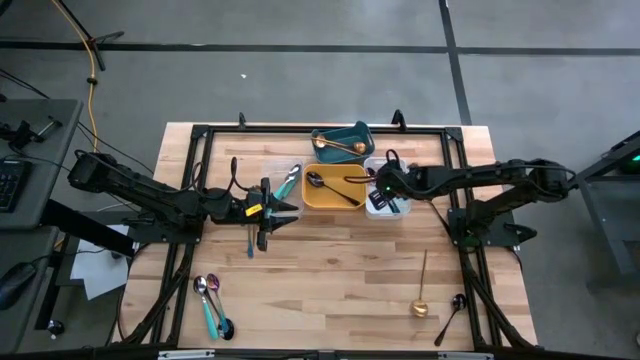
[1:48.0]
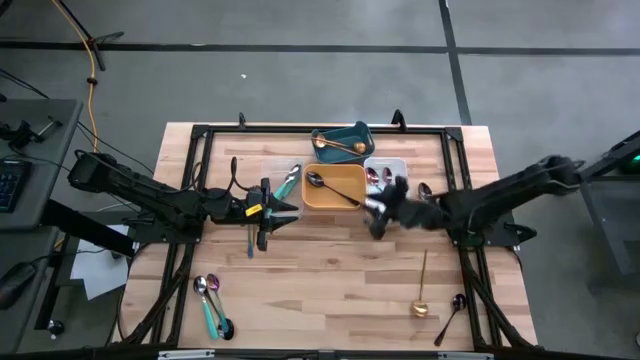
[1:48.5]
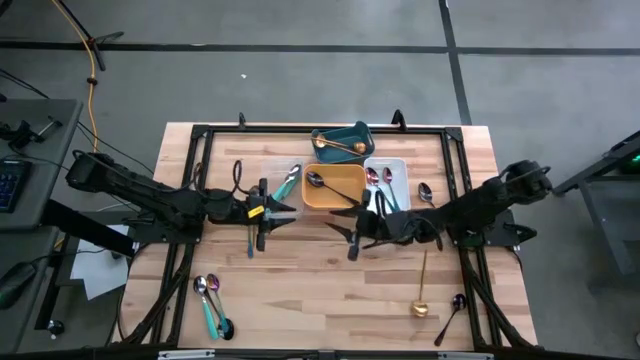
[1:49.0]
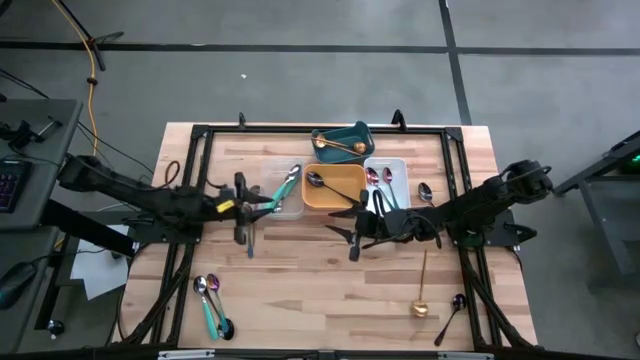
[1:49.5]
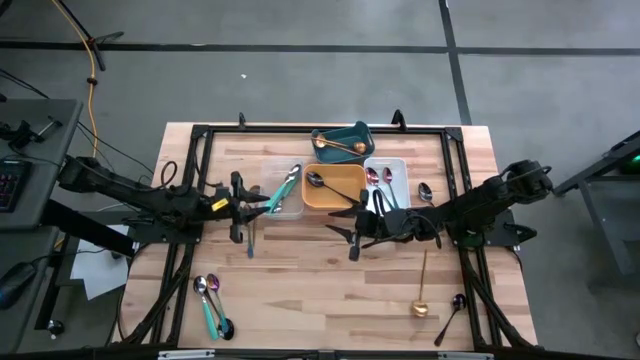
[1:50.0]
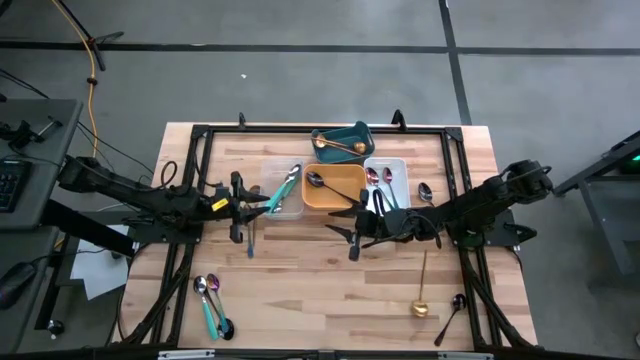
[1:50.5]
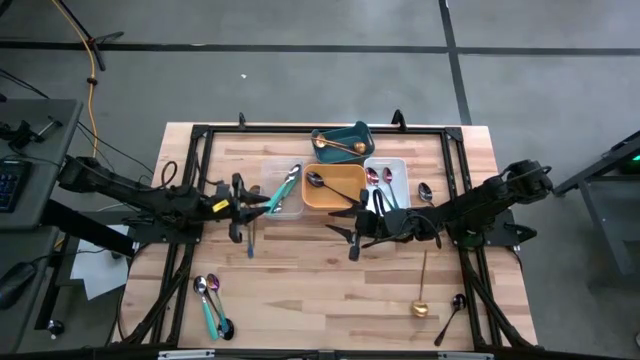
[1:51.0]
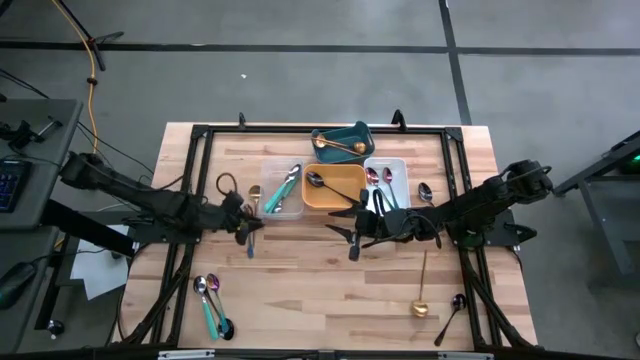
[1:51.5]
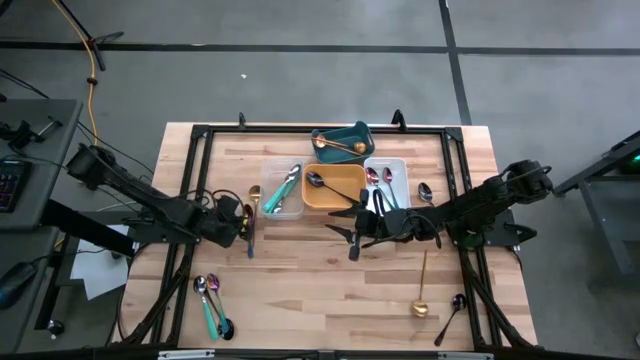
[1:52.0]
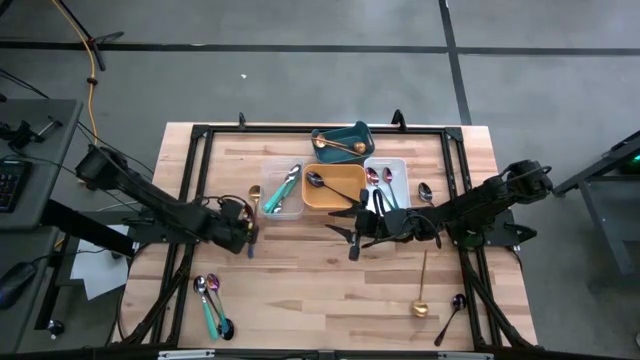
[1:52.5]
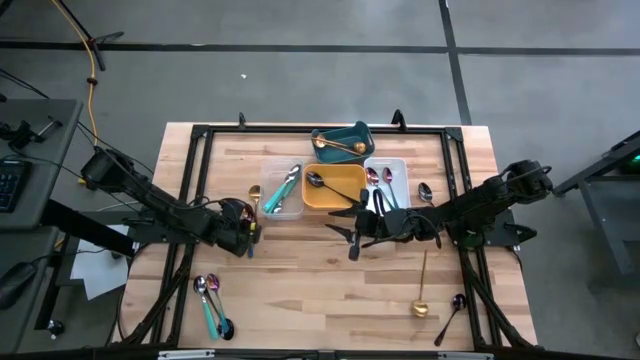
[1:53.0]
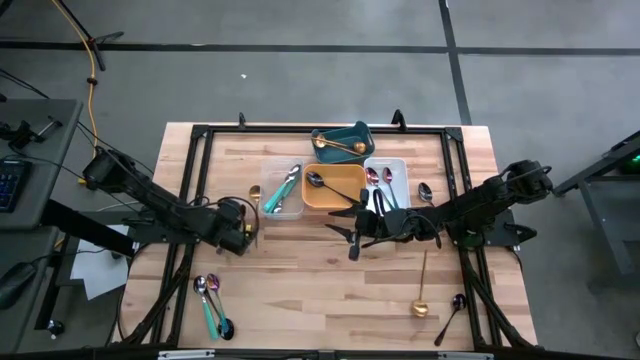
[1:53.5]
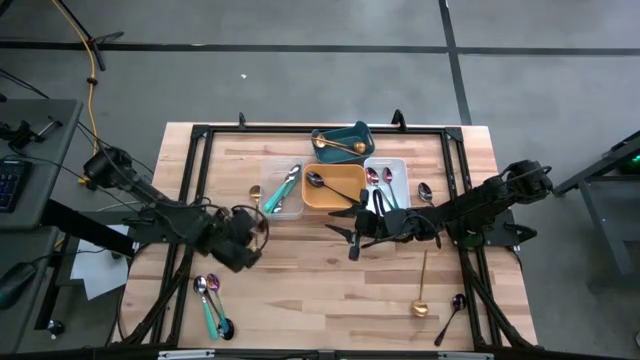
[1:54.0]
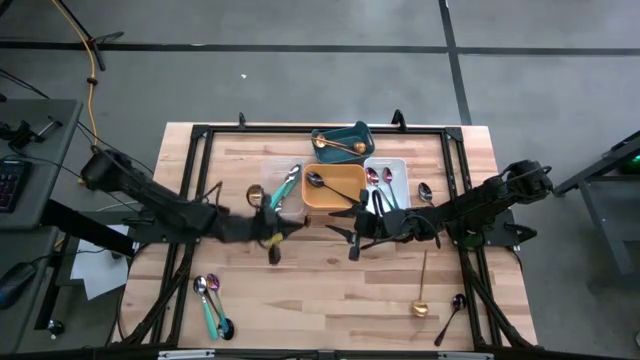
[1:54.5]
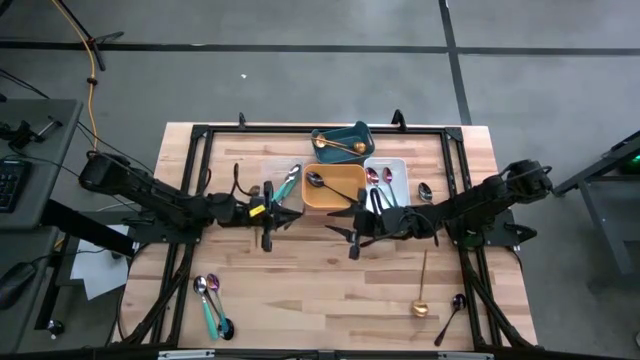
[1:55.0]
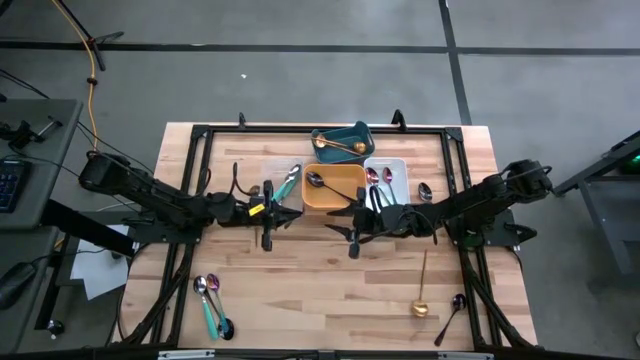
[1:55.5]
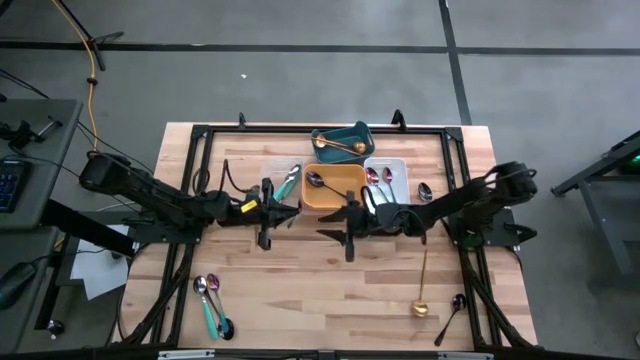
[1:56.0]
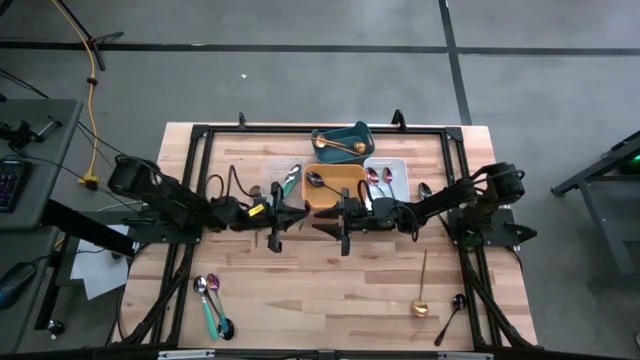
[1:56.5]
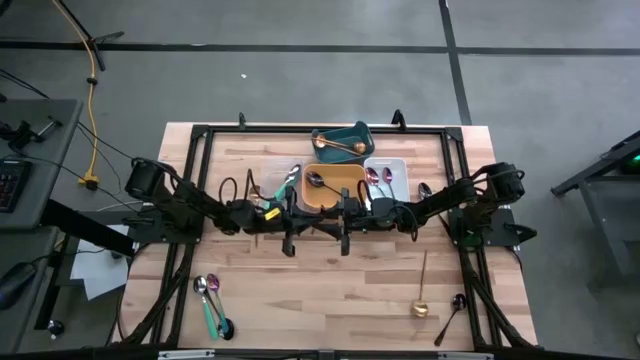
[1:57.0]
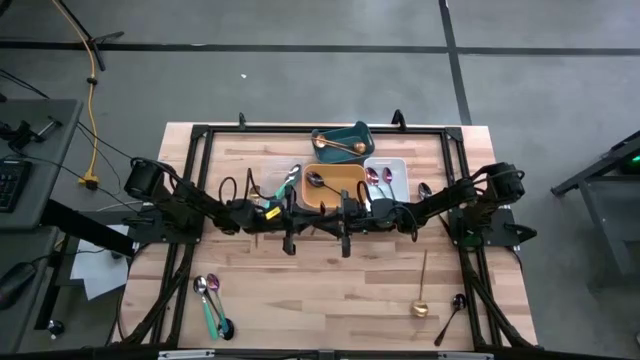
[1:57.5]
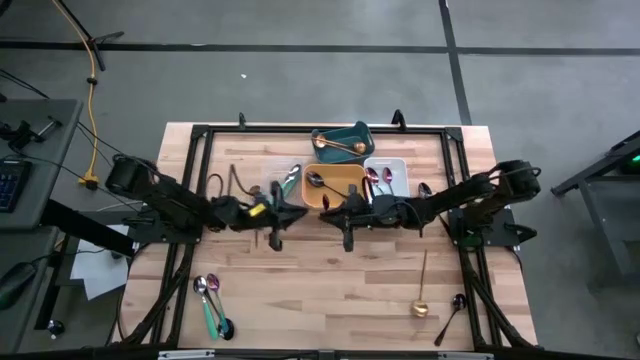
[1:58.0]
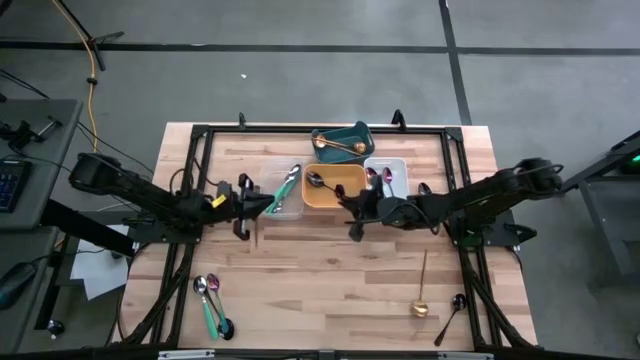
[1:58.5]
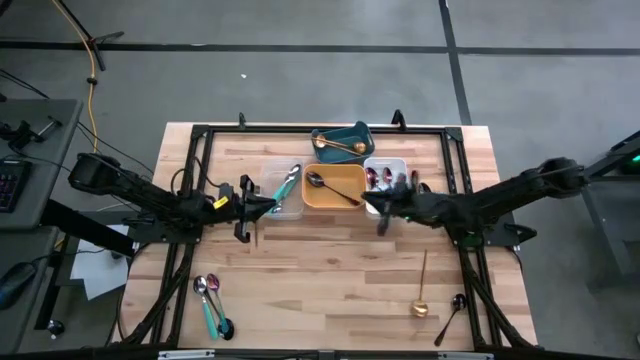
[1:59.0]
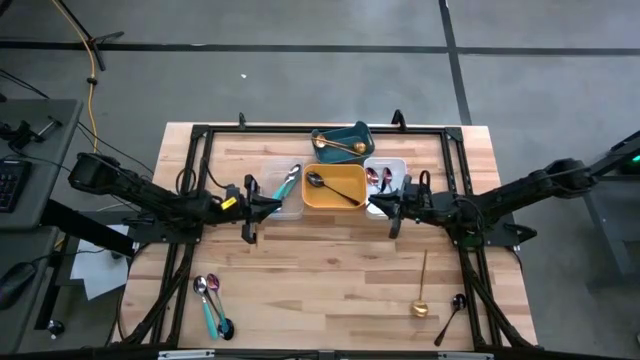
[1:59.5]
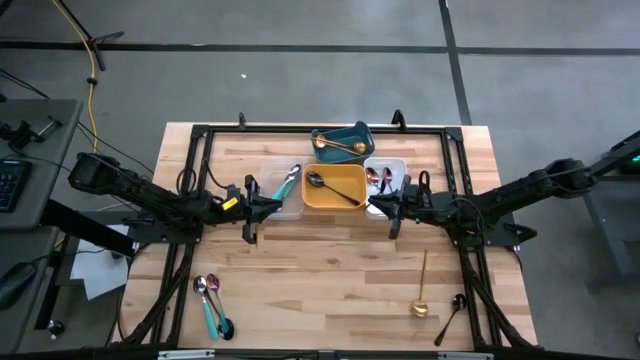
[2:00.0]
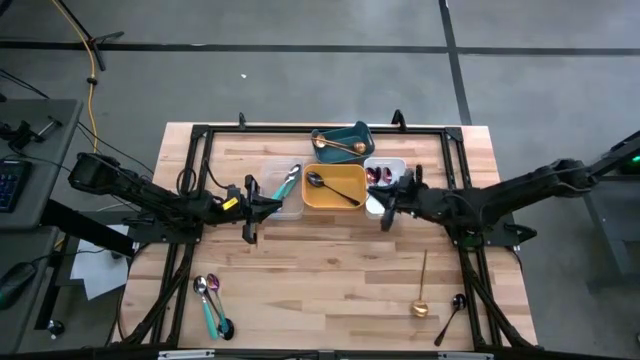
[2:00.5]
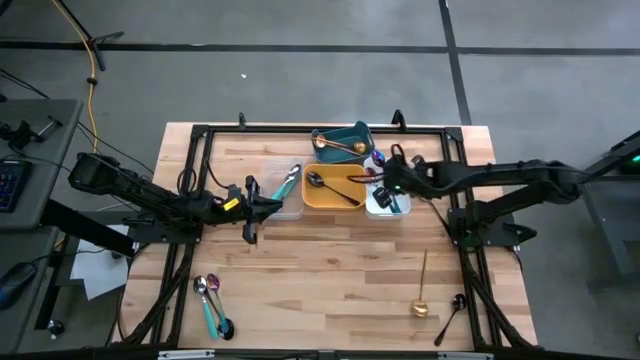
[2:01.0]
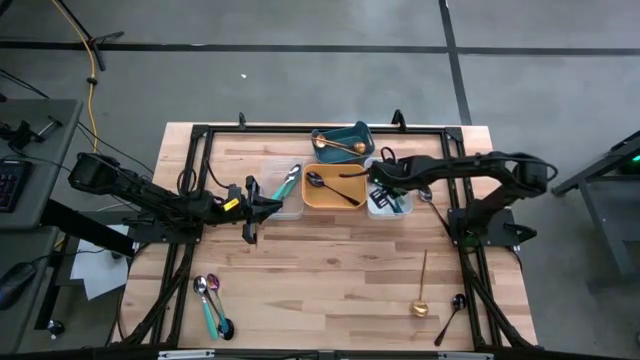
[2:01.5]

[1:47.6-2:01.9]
Task: Sort silverware by color (type)
Put the distorted-color spoon into the white bin

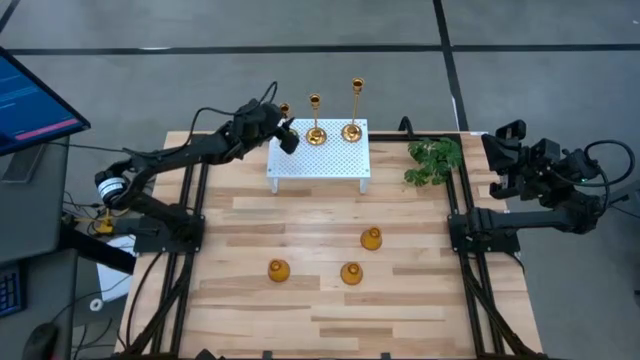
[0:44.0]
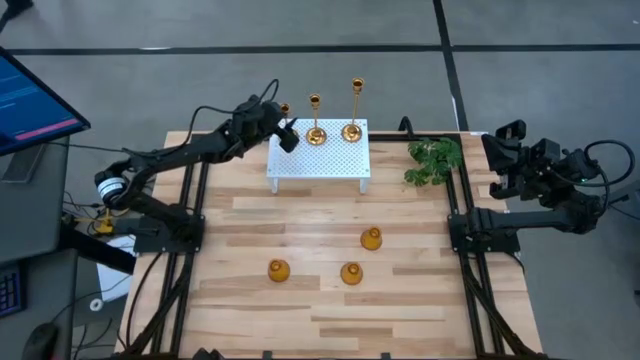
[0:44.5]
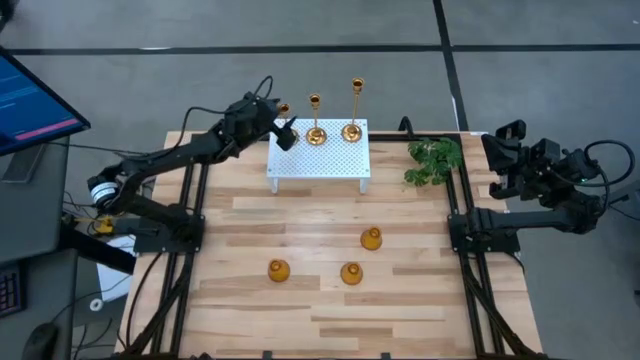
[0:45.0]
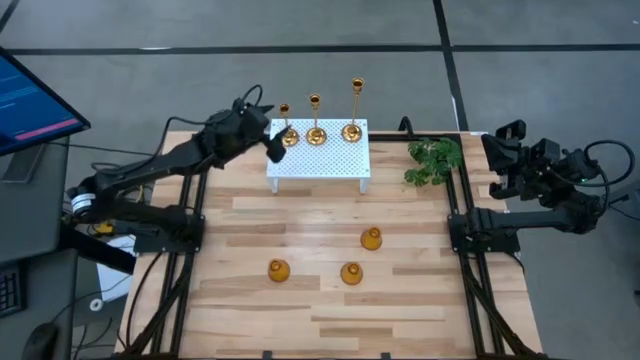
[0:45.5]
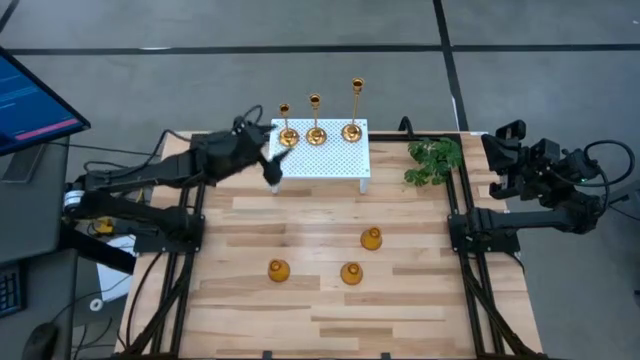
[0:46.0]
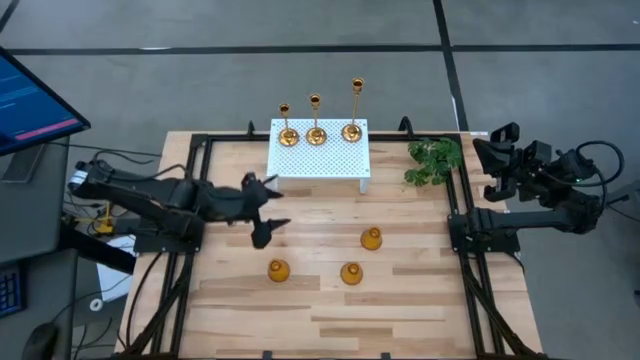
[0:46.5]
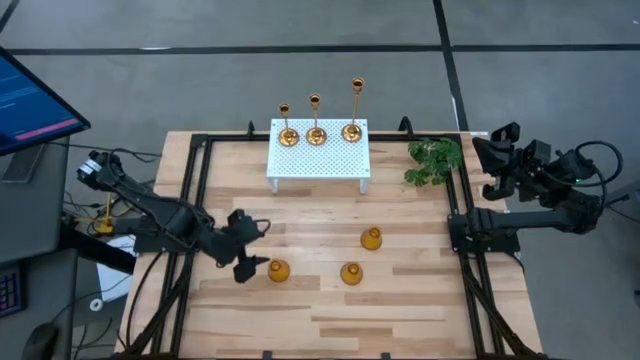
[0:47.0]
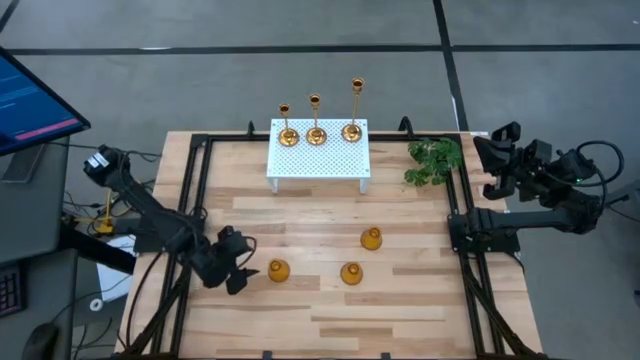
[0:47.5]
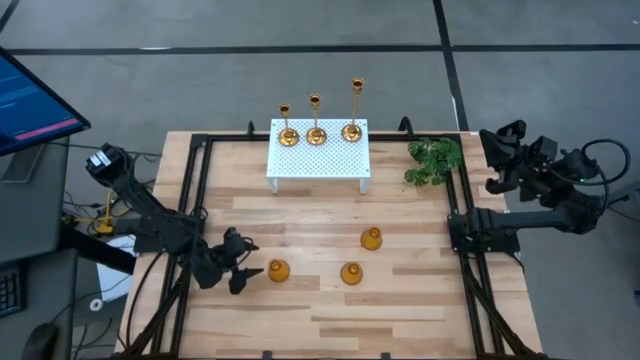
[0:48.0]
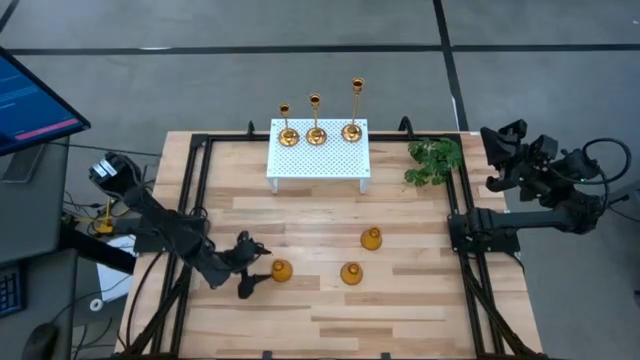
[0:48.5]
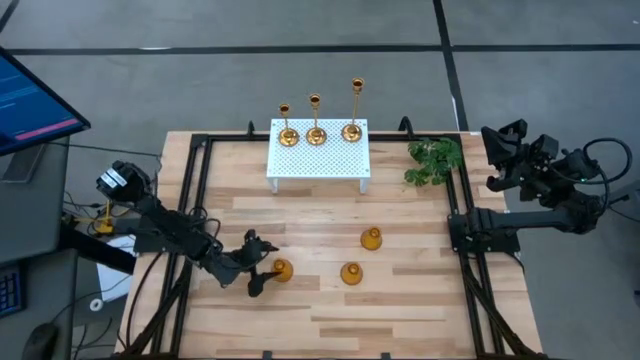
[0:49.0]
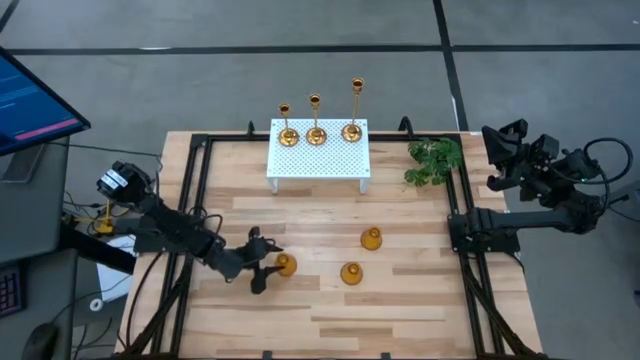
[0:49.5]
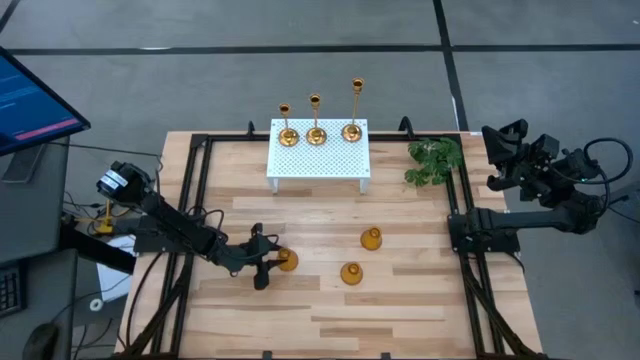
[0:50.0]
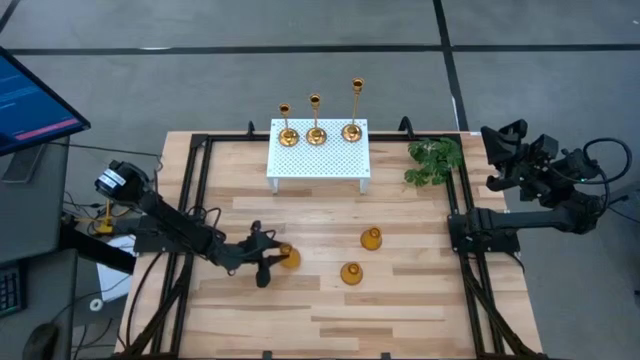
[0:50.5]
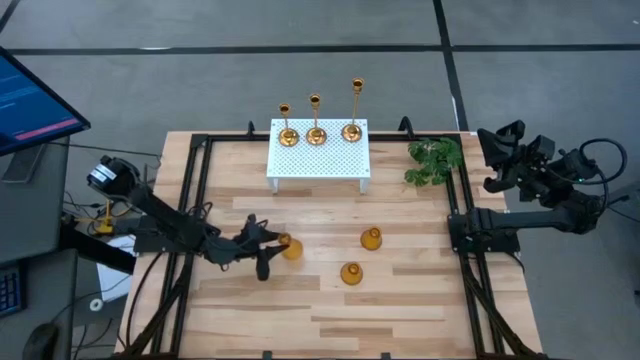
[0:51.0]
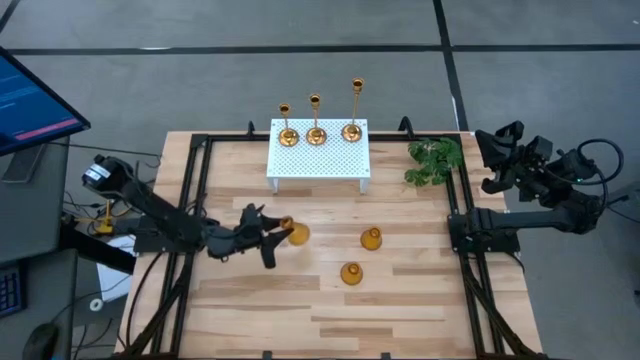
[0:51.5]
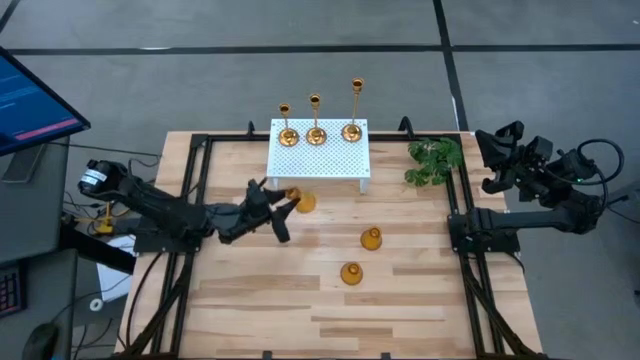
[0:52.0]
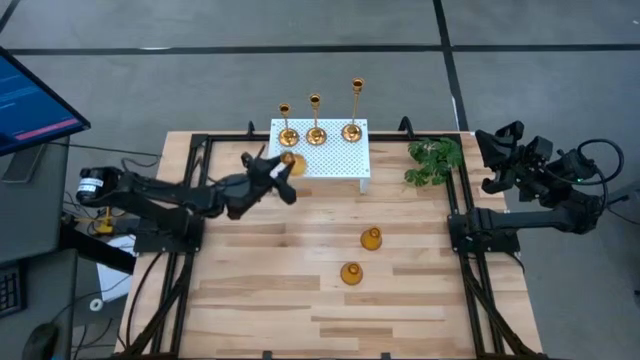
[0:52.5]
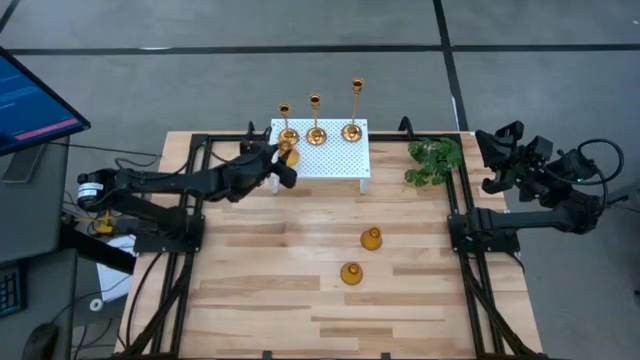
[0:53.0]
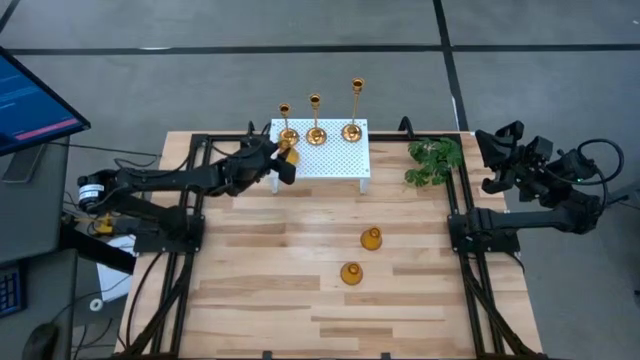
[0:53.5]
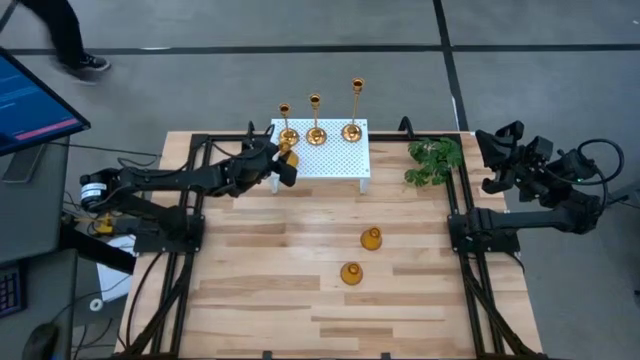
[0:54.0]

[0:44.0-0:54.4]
Task: Pick & Place candle stick holders
Put the left orange candle holder on the shelf aligned with the small gold candle holder
